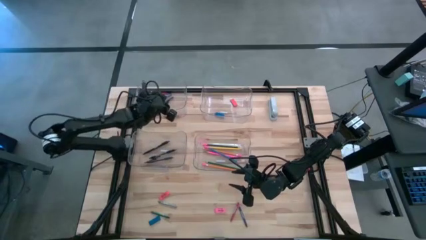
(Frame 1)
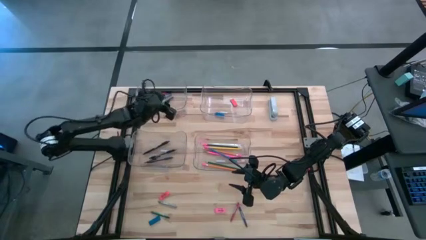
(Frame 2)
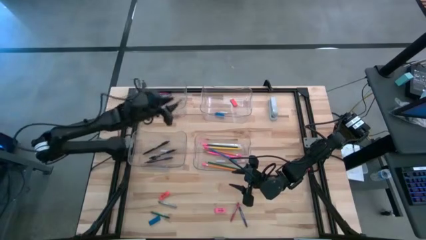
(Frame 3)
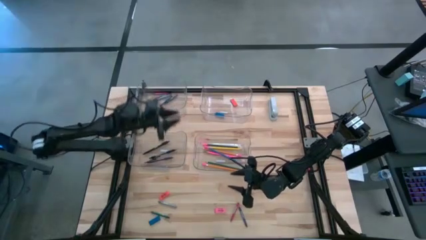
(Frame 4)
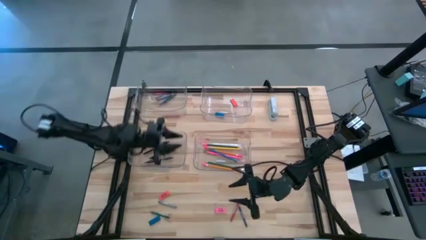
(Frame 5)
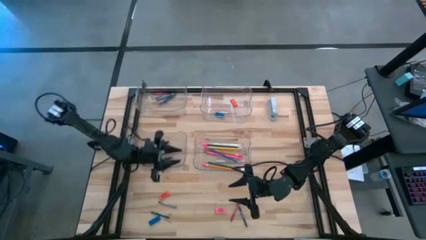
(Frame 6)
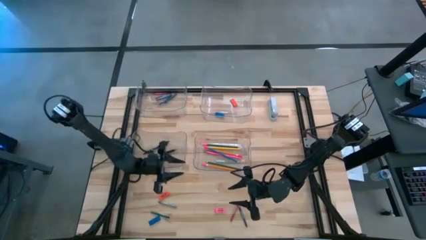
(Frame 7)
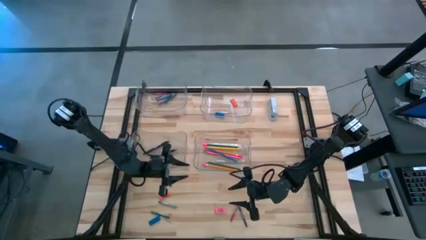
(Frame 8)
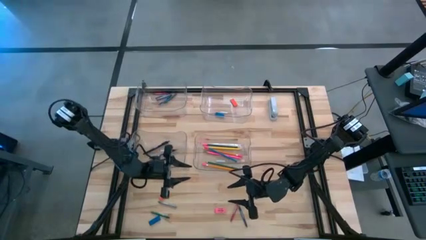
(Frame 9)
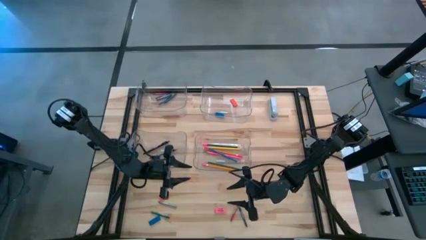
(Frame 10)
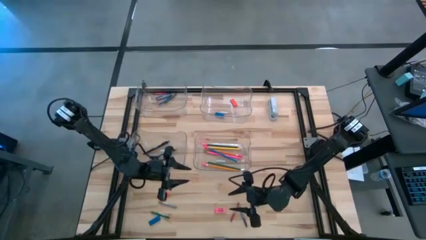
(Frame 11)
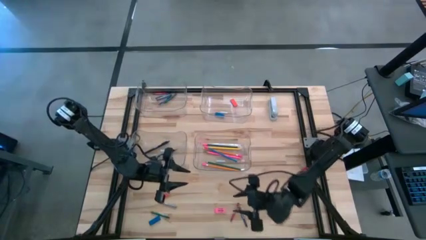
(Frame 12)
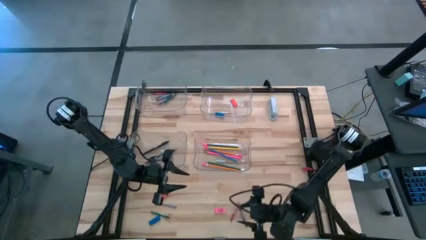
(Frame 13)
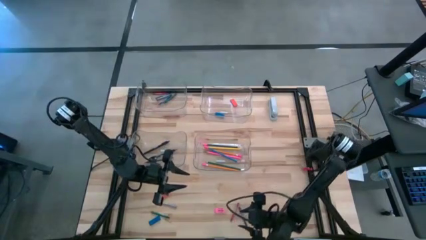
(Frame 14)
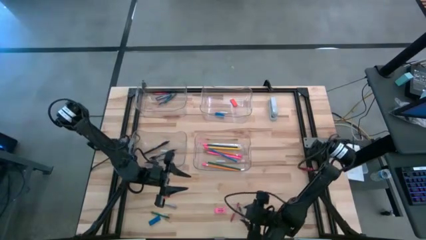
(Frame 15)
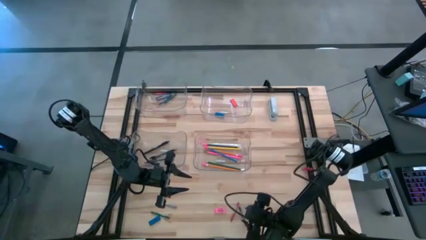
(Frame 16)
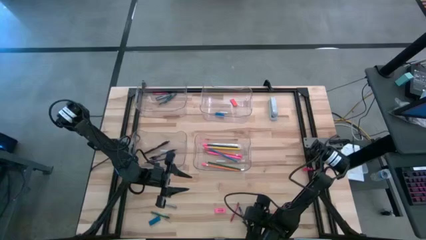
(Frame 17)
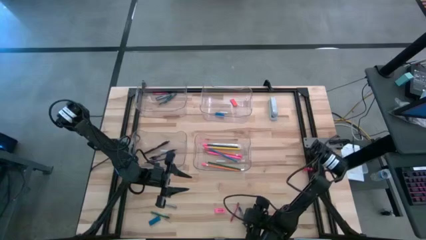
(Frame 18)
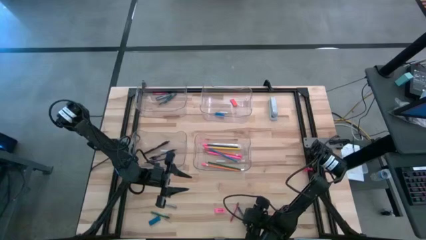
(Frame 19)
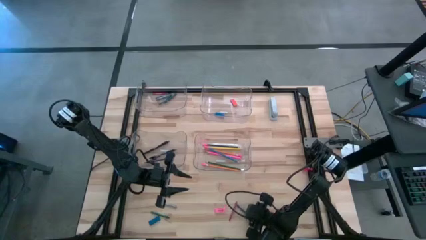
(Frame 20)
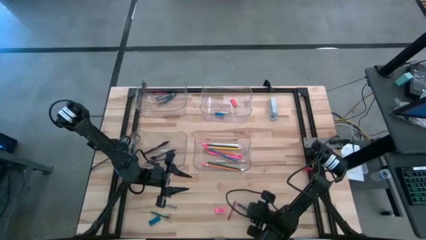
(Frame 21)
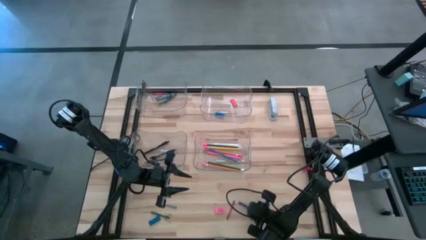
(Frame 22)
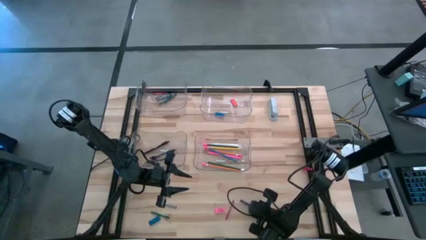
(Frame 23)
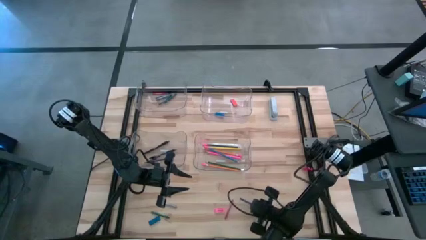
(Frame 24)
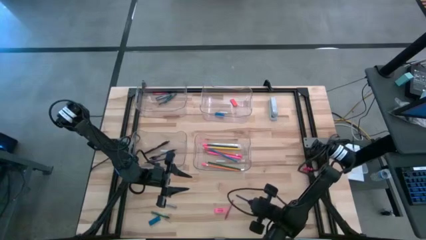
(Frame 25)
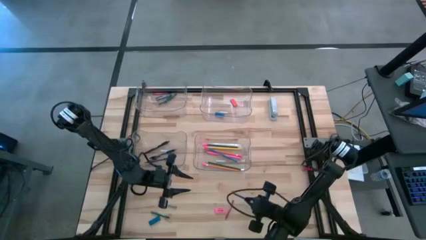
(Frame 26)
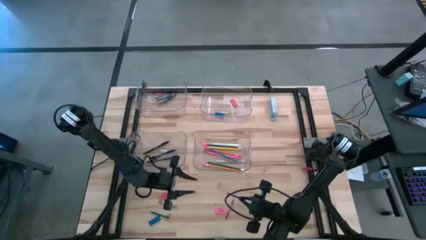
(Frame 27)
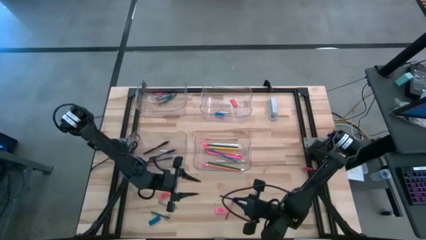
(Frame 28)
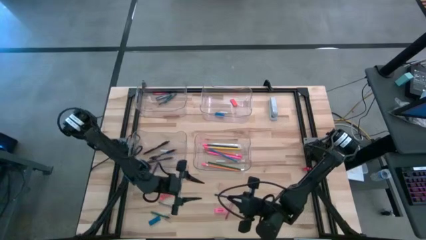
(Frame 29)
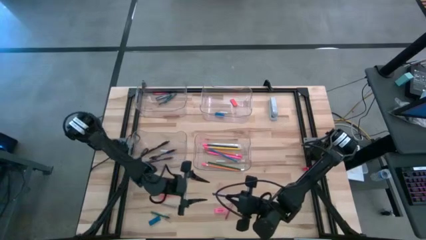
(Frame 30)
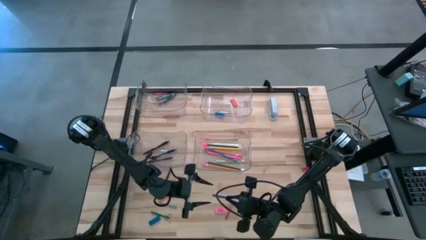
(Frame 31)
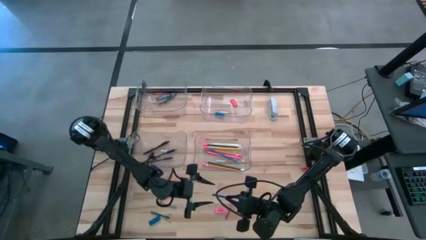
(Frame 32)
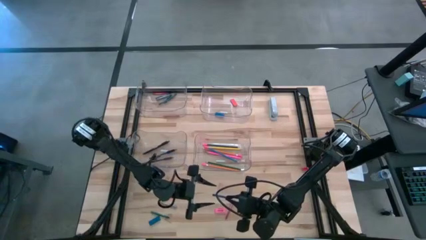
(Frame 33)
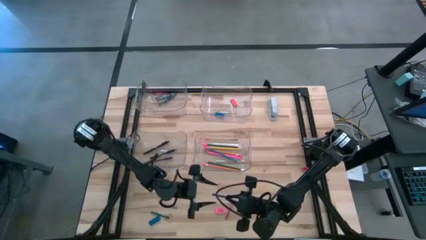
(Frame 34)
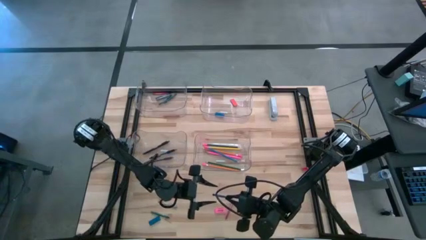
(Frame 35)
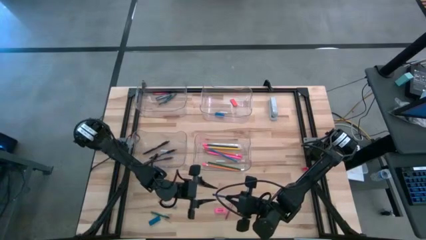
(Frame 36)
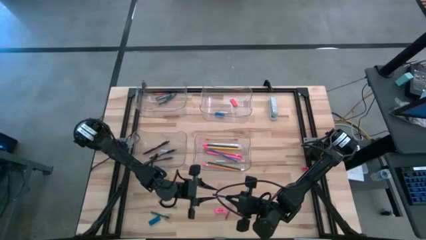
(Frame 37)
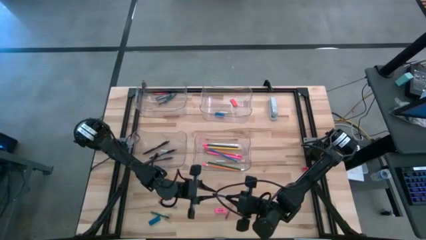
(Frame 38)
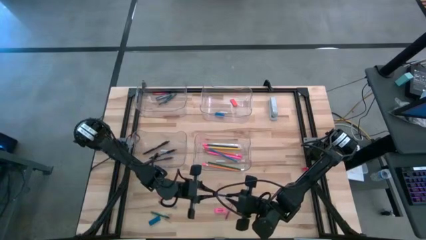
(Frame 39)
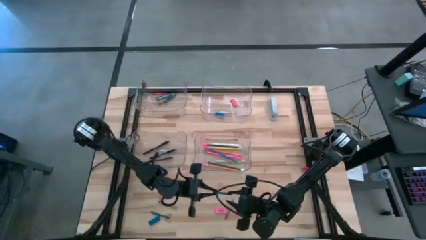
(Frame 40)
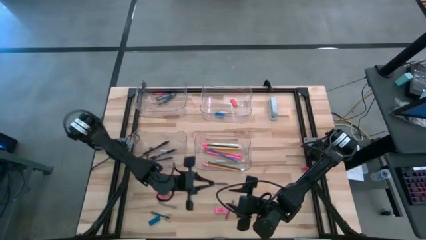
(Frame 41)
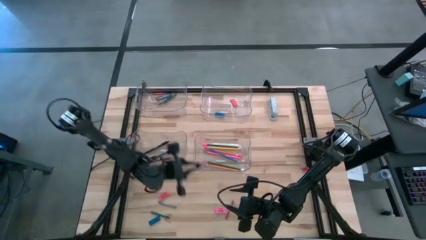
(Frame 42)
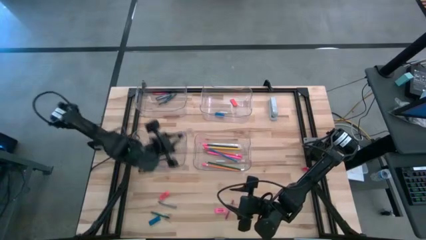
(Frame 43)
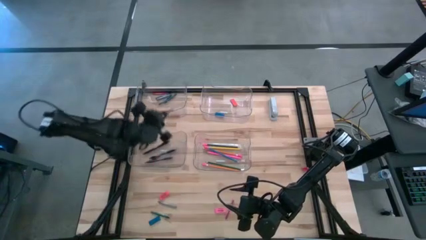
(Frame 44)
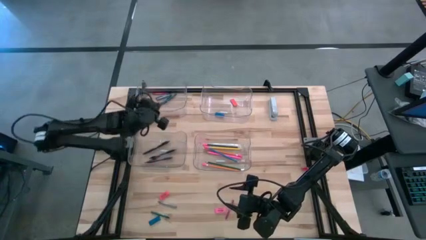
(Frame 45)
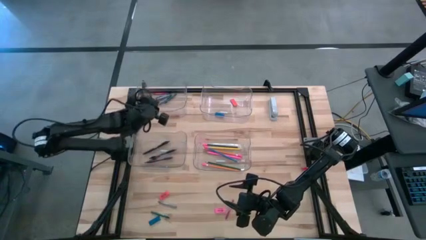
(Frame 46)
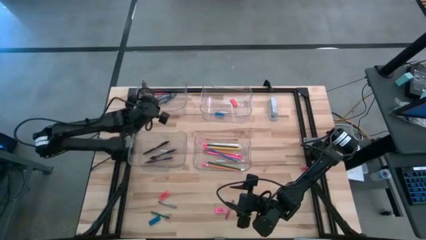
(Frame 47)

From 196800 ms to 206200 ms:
Task: Sort crayons/erasers/pens/pencils in bins
Put the blue crayon into the top left transparent bin

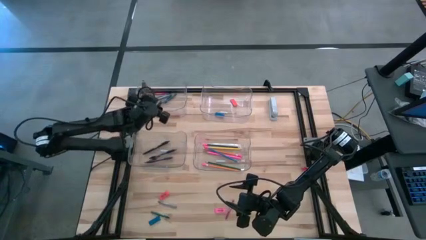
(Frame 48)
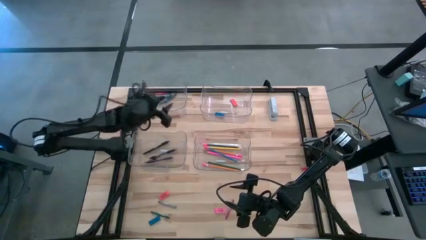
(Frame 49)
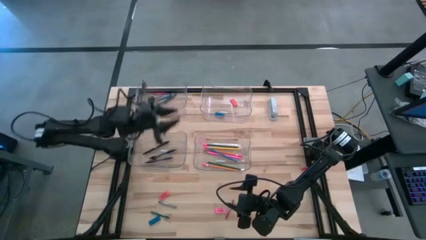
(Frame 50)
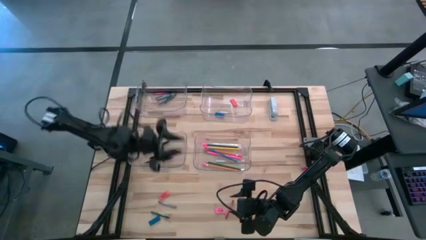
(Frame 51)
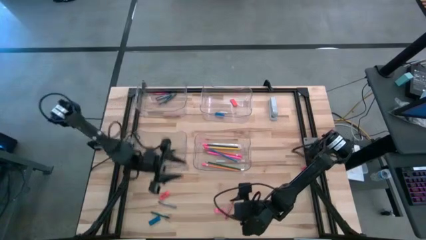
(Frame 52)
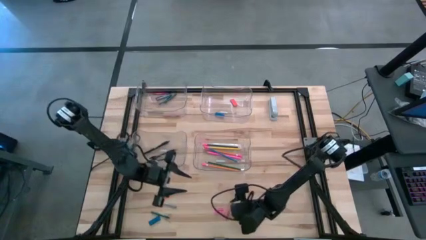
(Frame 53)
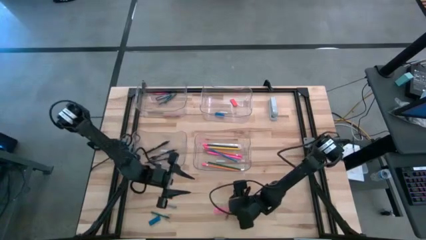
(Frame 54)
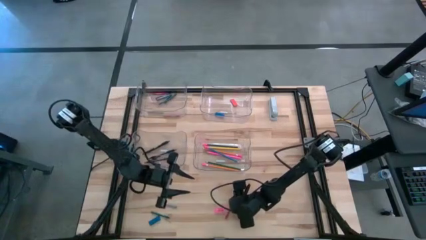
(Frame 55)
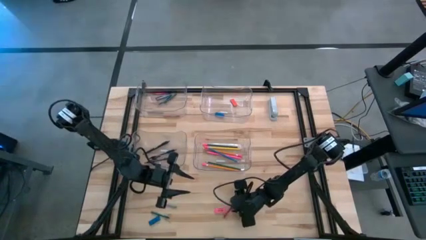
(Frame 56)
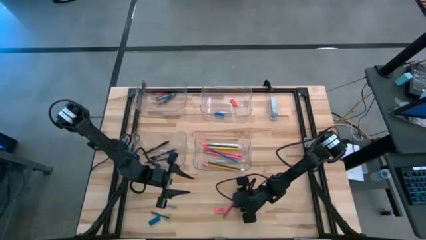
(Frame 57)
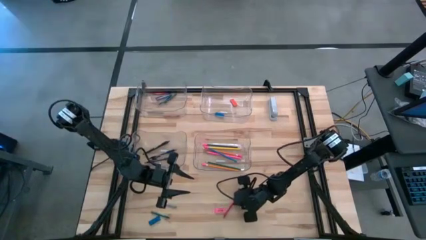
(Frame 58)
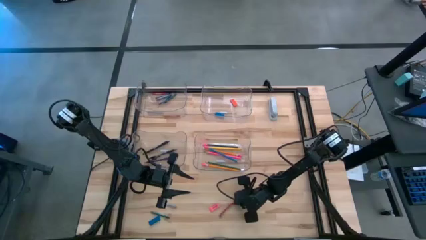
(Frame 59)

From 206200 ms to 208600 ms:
Put the red crayon into the top left transparent bin

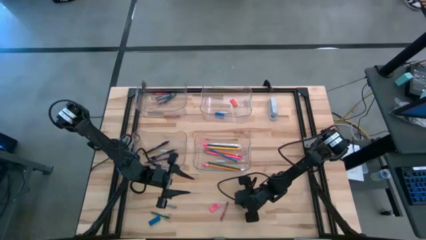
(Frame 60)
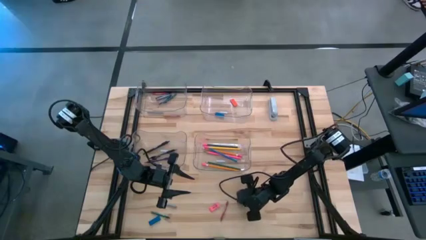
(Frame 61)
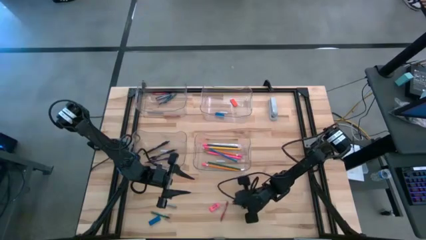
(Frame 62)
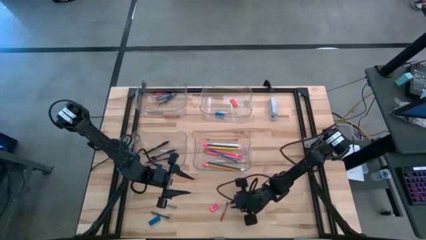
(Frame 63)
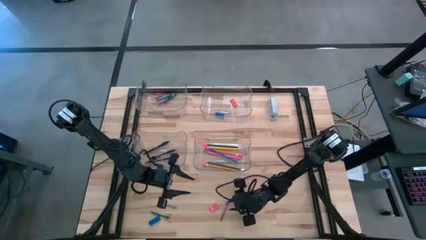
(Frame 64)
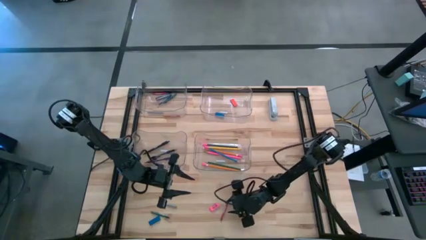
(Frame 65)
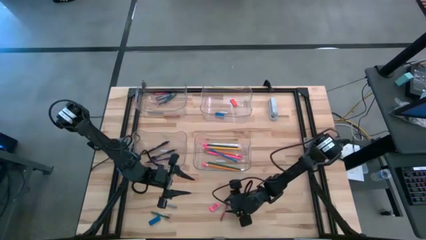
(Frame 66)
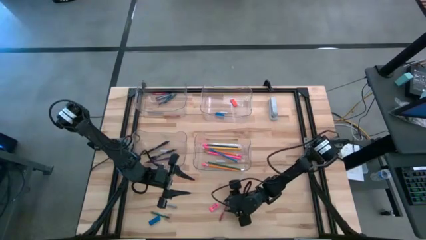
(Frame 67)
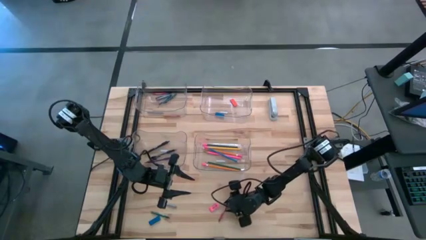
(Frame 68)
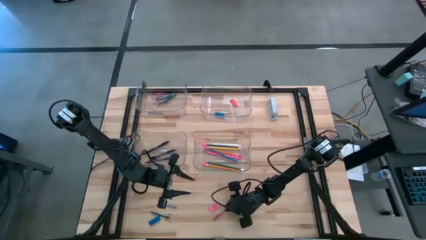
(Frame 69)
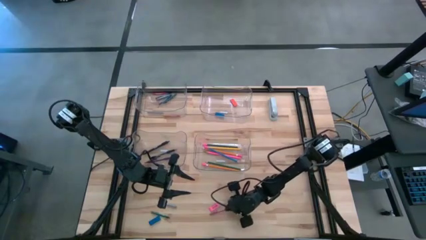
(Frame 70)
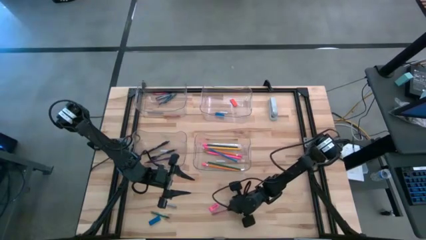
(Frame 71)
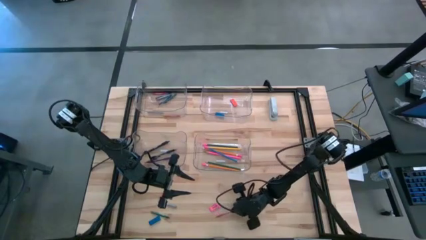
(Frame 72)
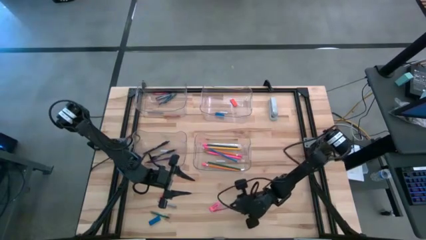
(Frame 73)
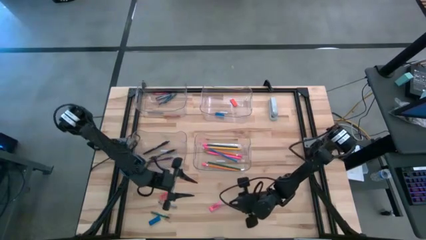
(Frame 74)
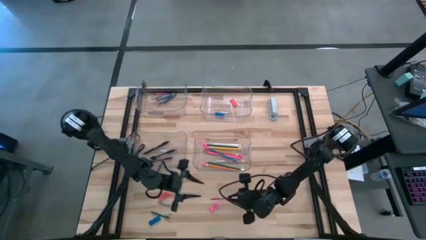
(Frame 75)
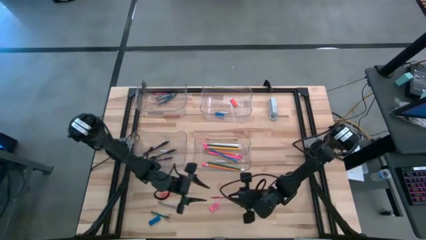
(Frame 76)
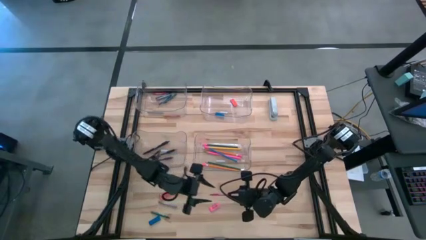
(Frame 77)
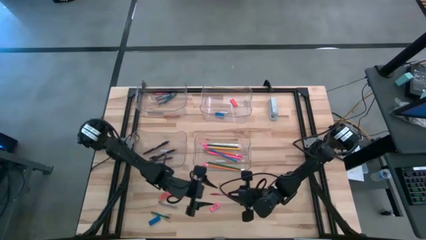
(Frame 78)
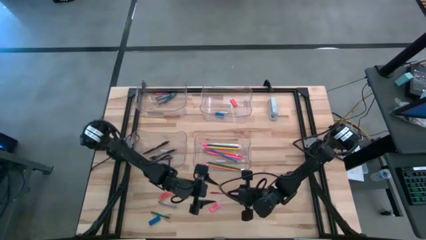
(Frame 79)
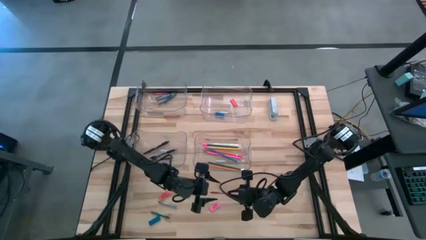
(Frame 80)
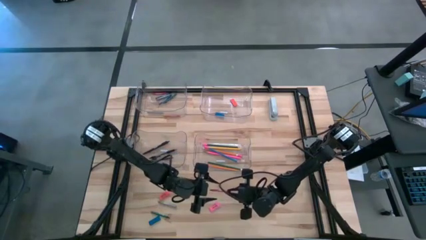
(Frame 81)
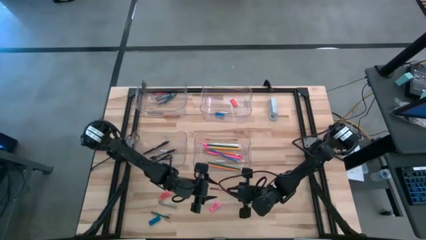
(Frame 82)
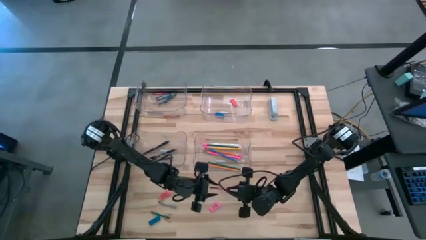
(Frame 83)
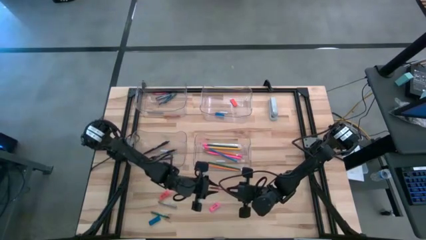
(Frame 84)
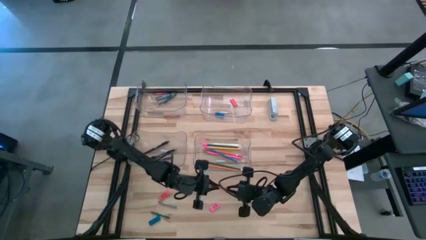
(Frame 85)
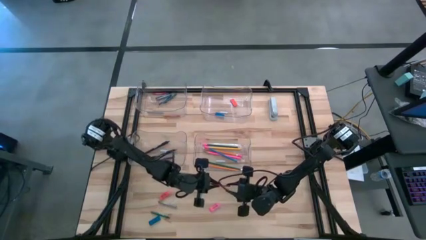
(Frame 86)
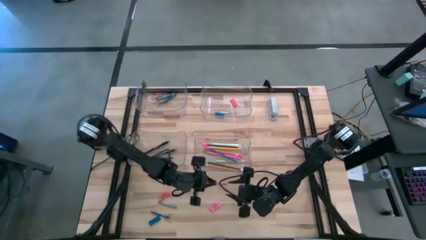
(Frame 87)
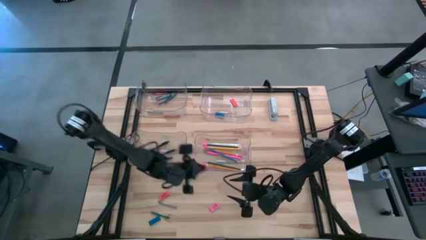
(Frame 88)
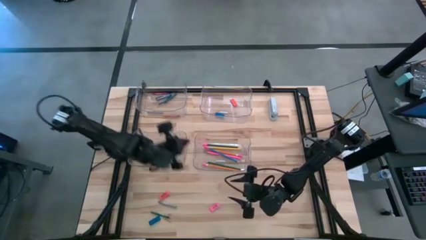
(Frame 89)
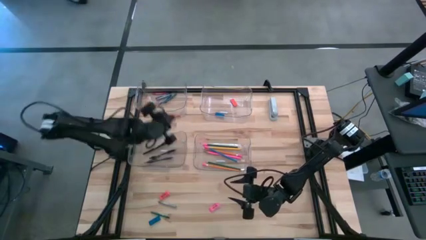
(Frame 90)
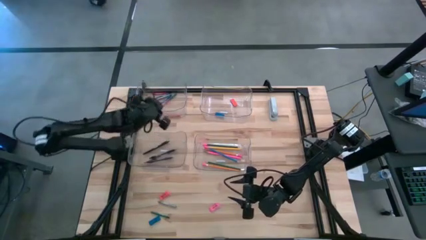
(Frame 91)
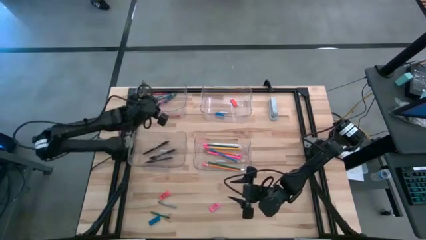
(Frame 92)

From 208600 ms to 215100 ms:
Put the red crayon into the top left transparent bin
